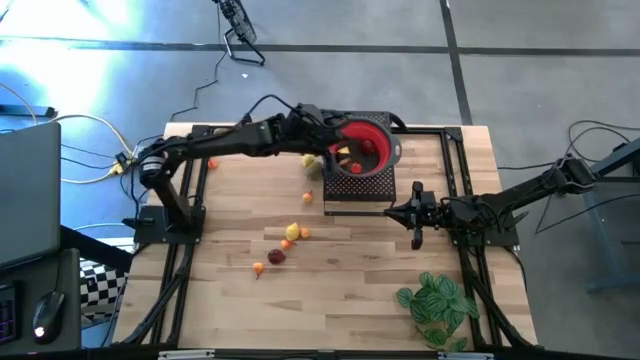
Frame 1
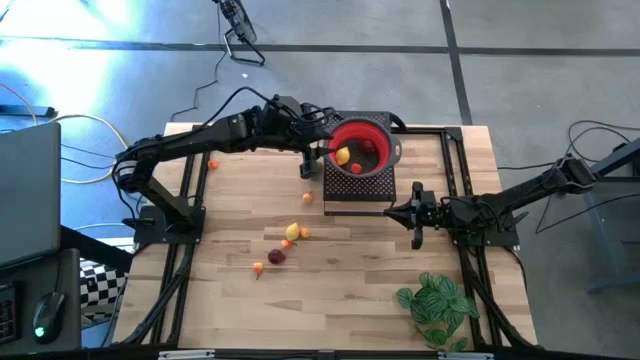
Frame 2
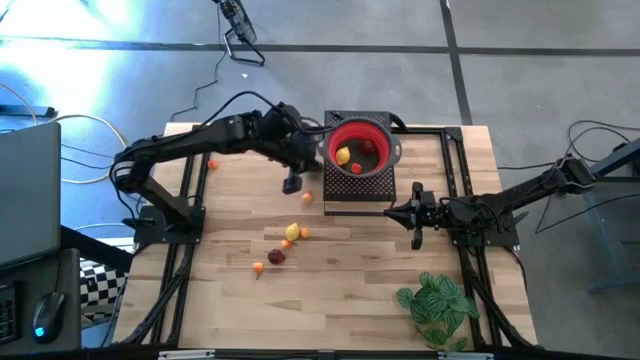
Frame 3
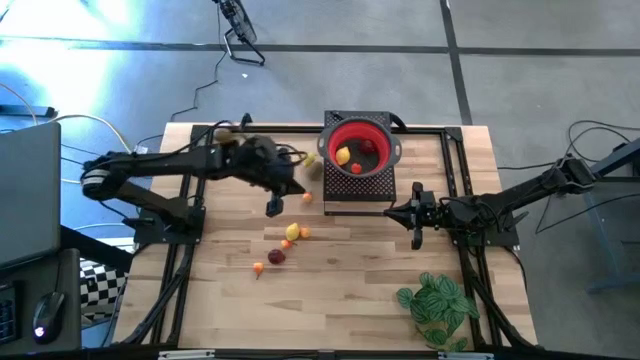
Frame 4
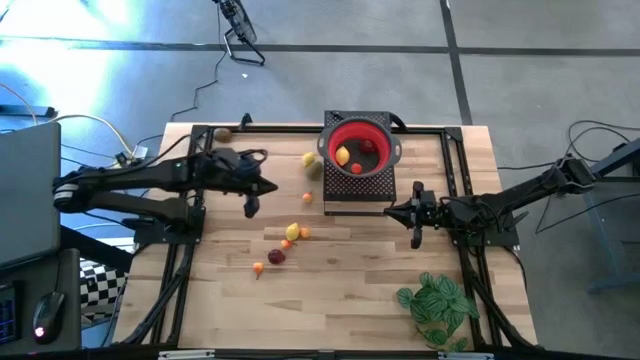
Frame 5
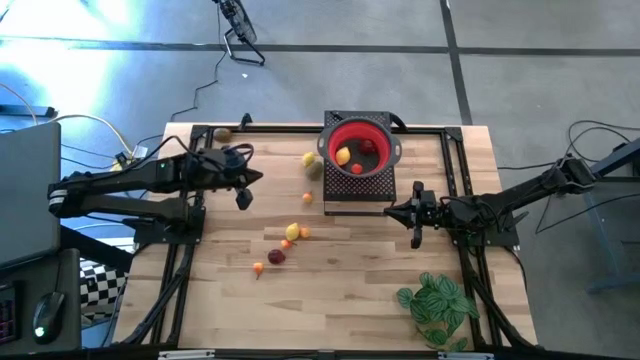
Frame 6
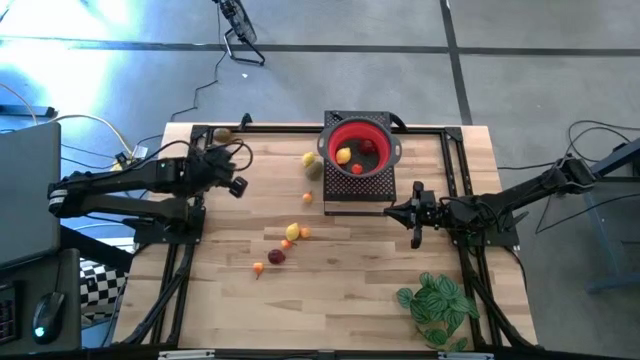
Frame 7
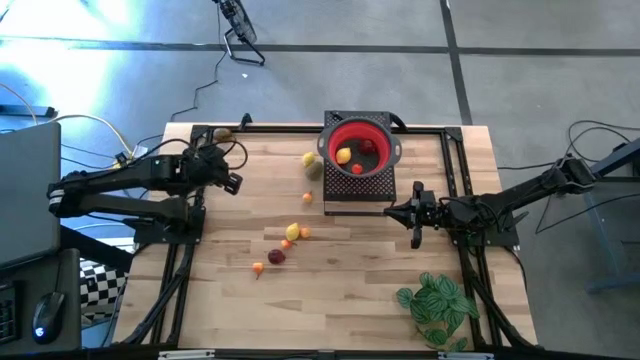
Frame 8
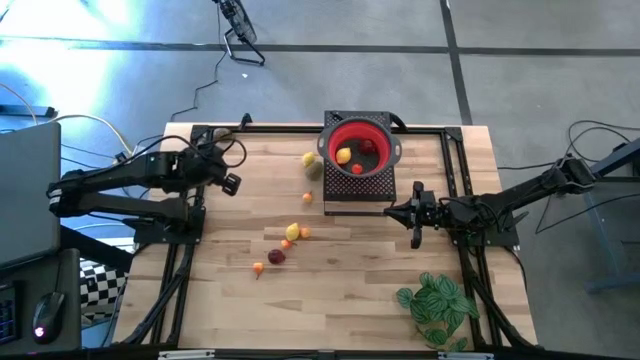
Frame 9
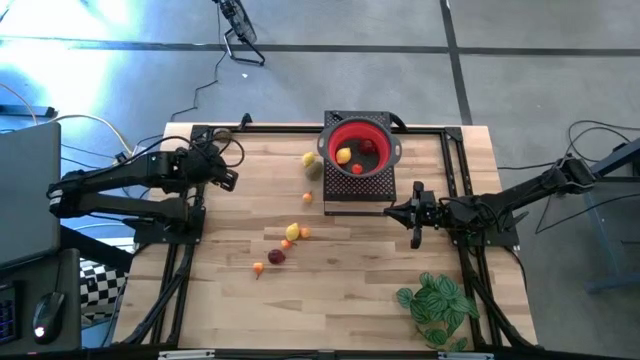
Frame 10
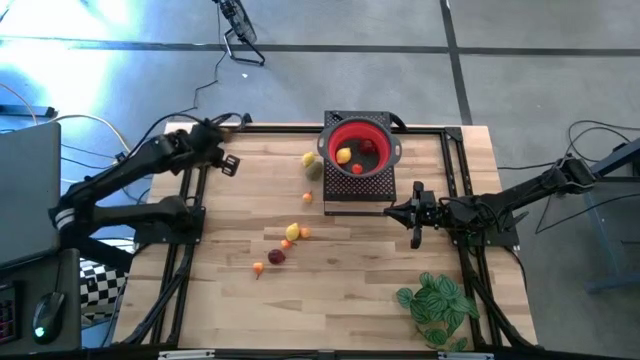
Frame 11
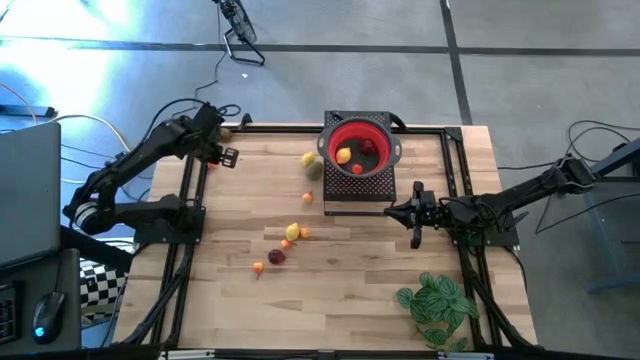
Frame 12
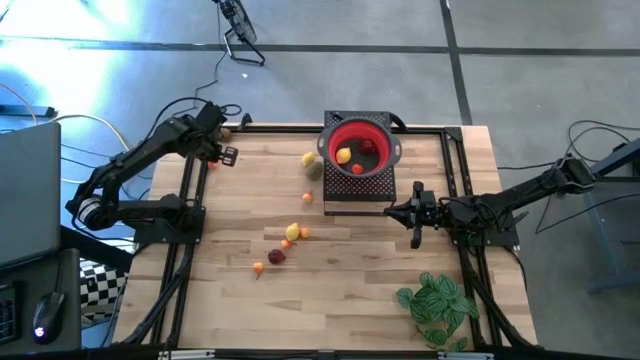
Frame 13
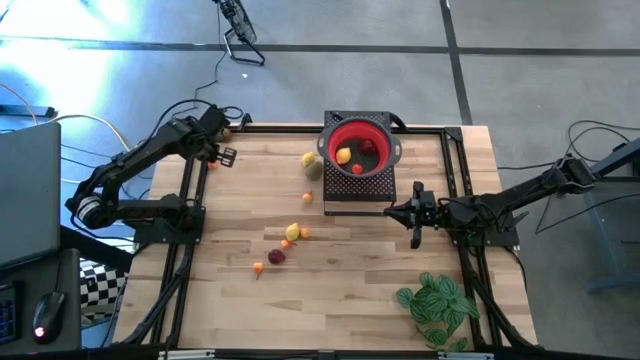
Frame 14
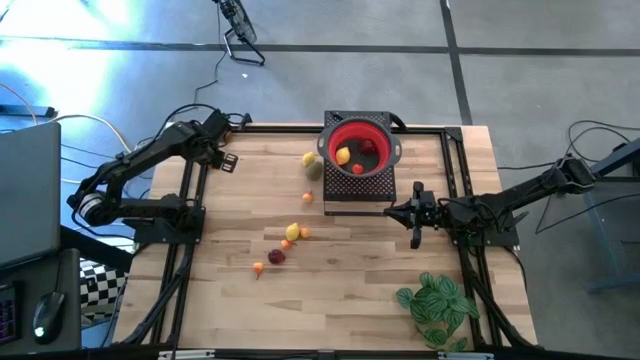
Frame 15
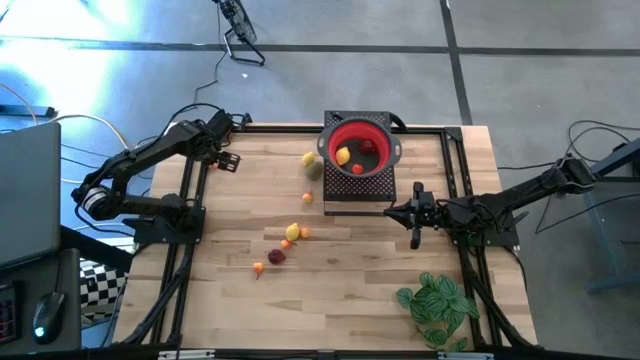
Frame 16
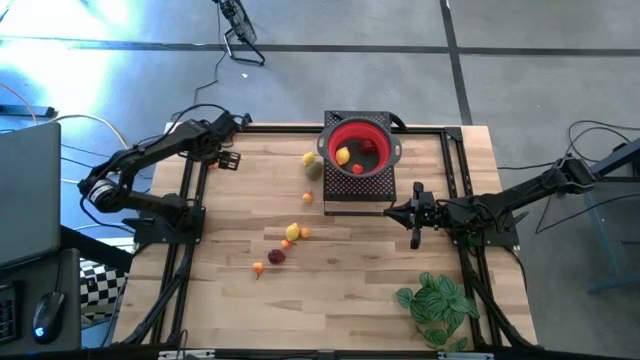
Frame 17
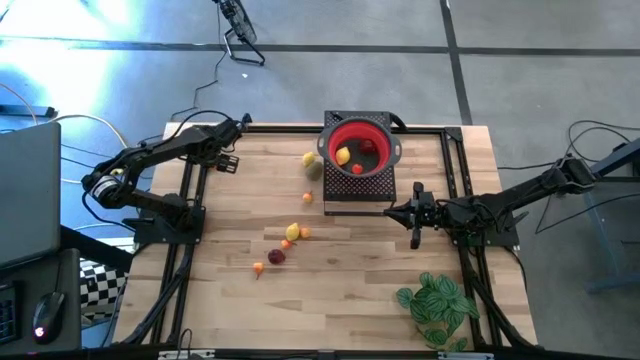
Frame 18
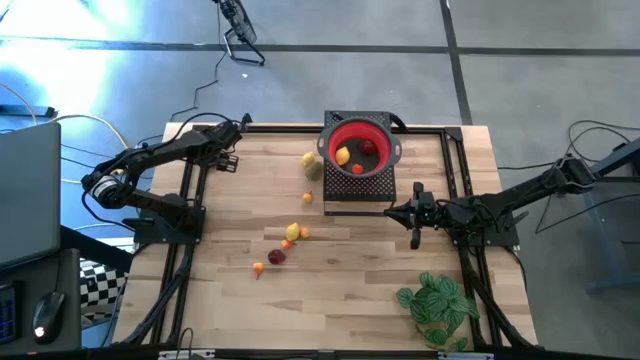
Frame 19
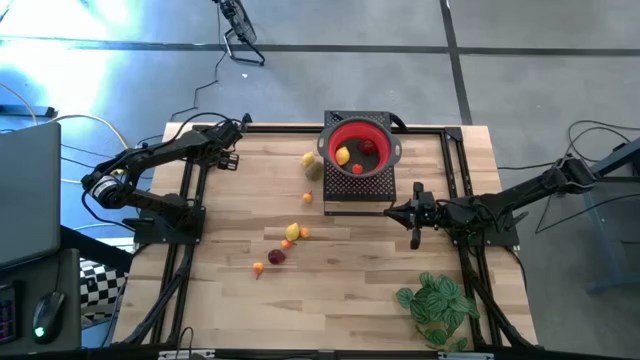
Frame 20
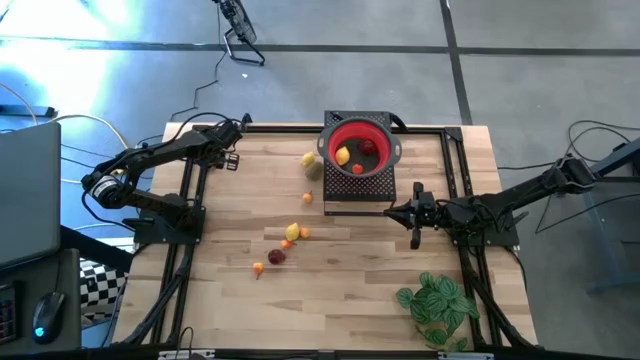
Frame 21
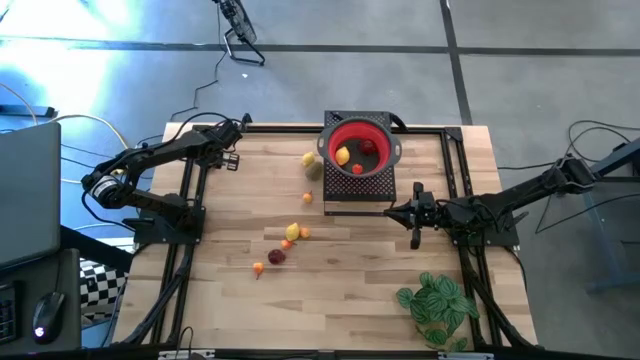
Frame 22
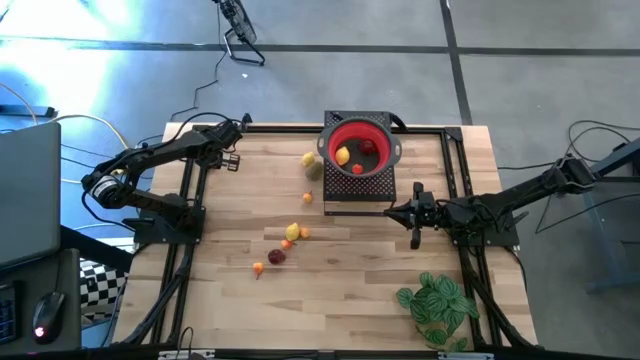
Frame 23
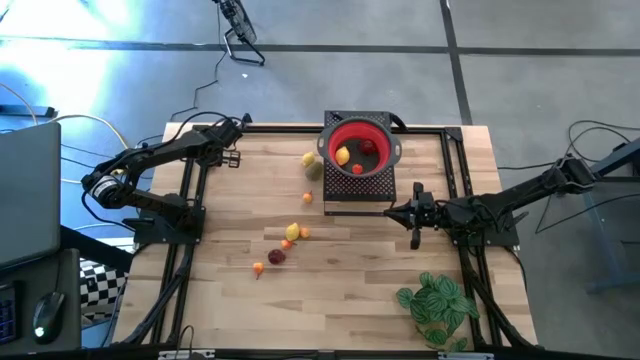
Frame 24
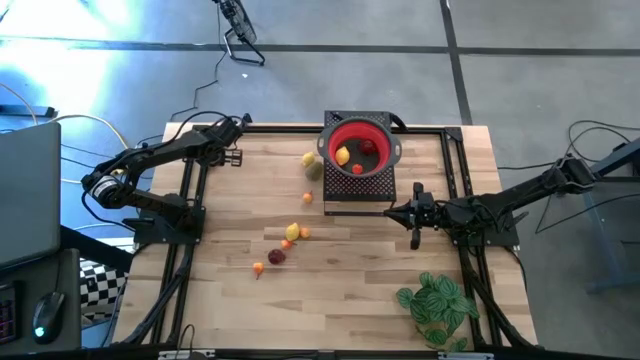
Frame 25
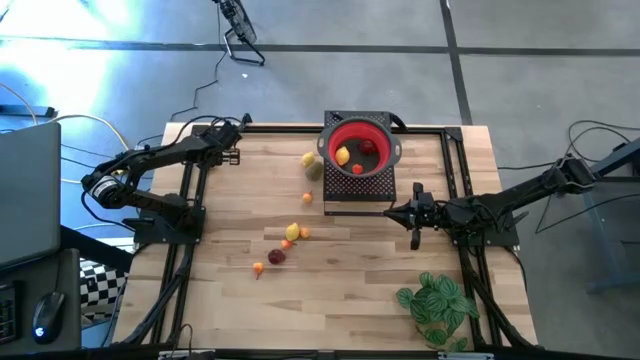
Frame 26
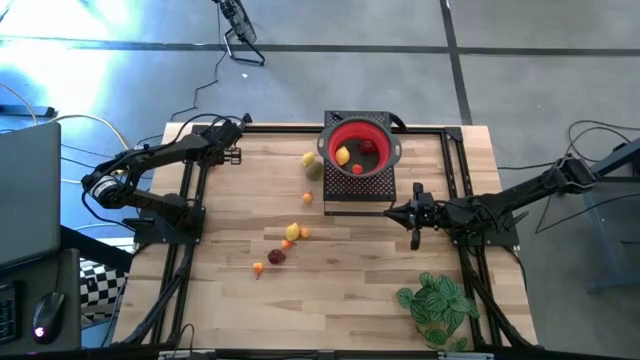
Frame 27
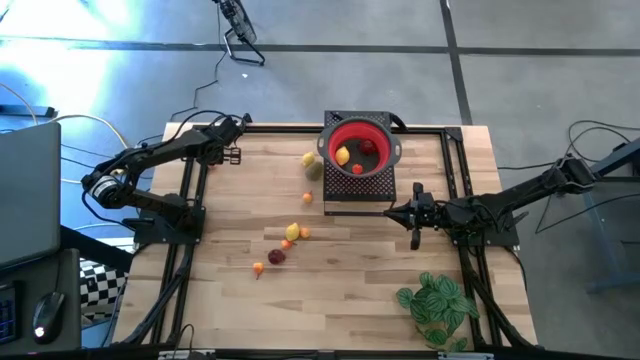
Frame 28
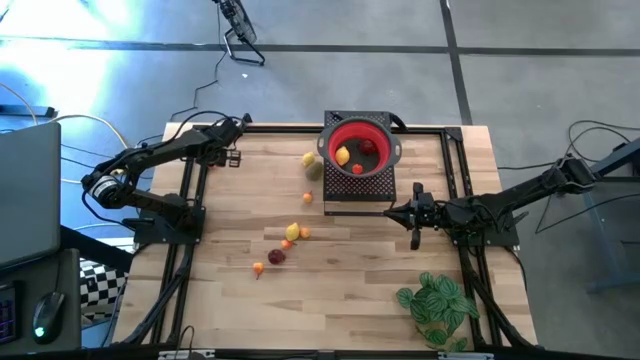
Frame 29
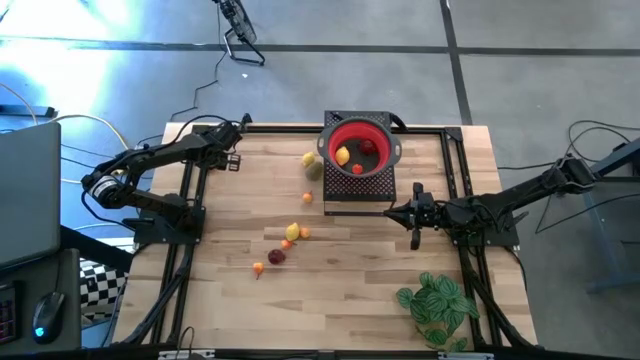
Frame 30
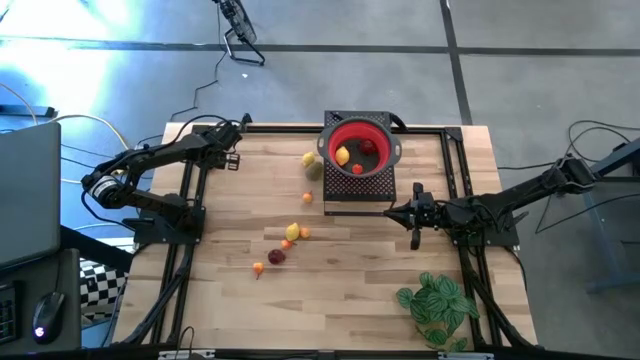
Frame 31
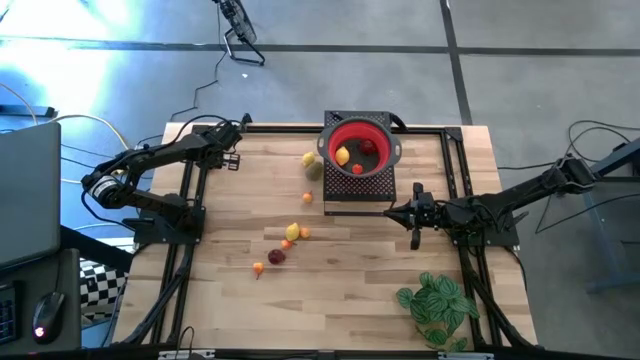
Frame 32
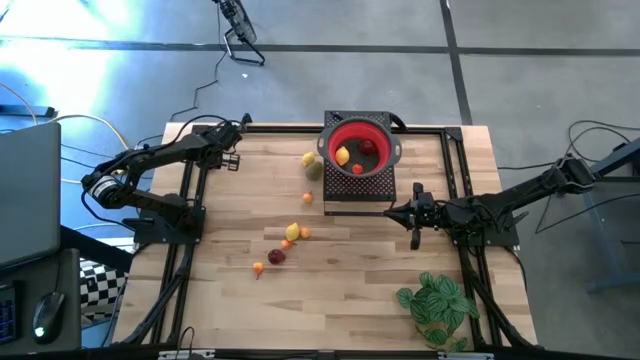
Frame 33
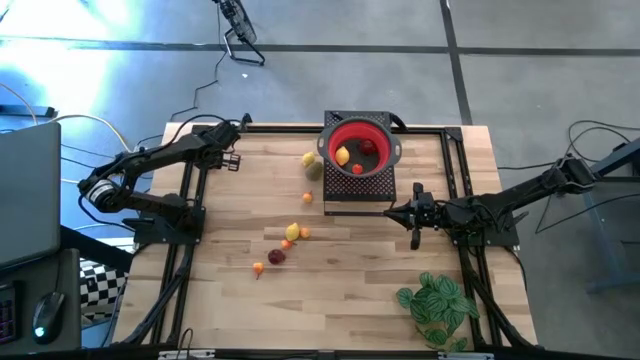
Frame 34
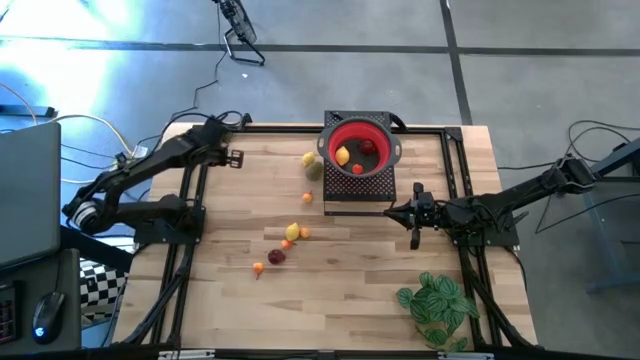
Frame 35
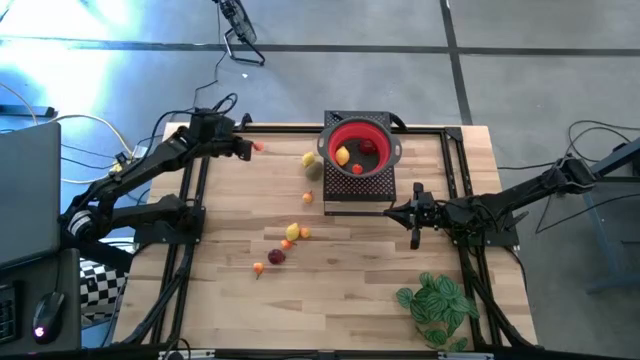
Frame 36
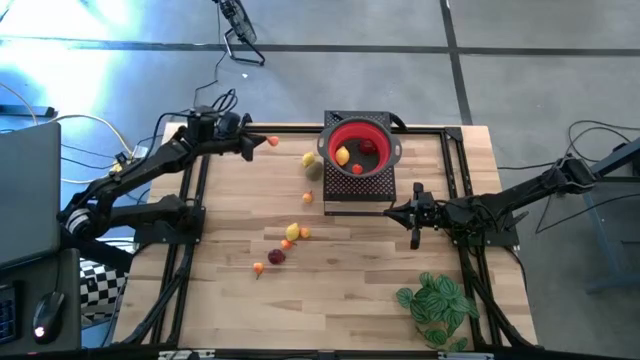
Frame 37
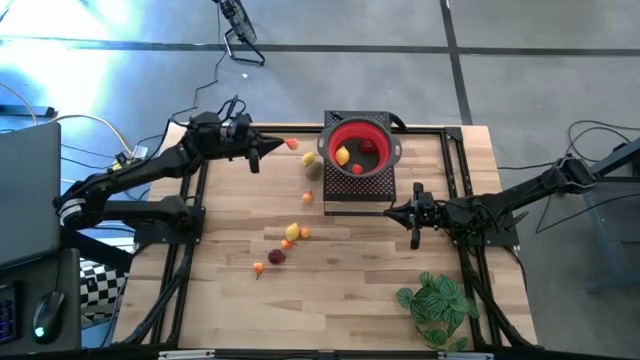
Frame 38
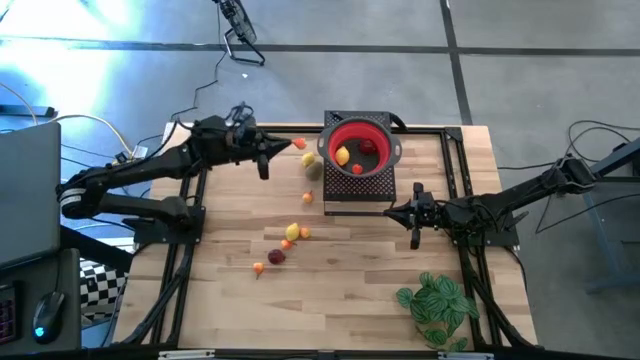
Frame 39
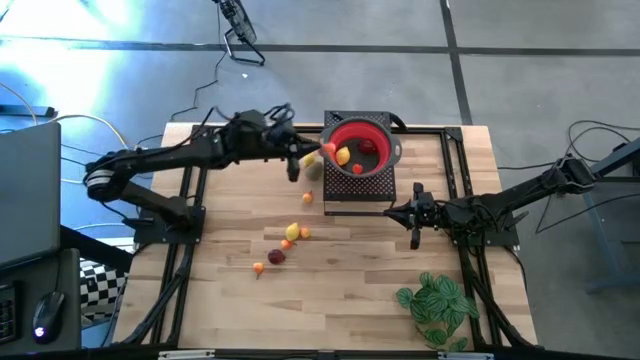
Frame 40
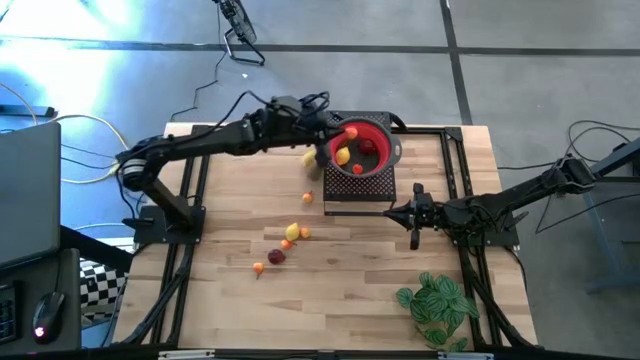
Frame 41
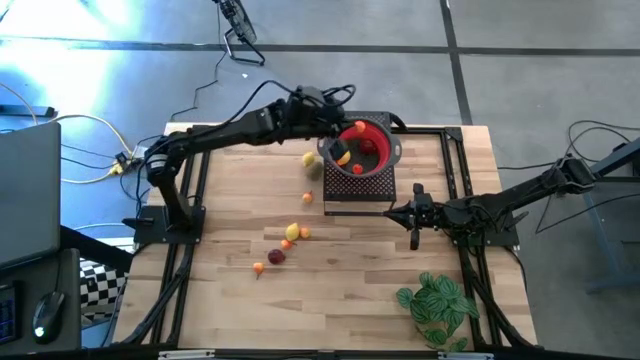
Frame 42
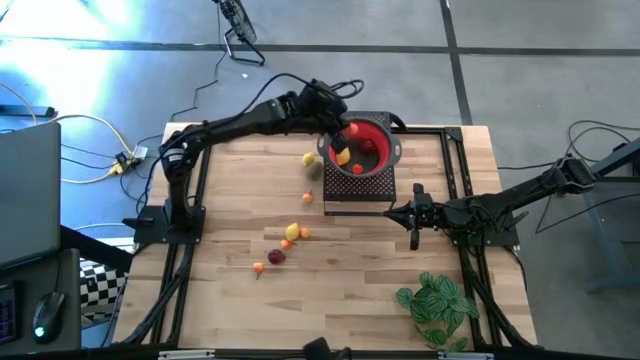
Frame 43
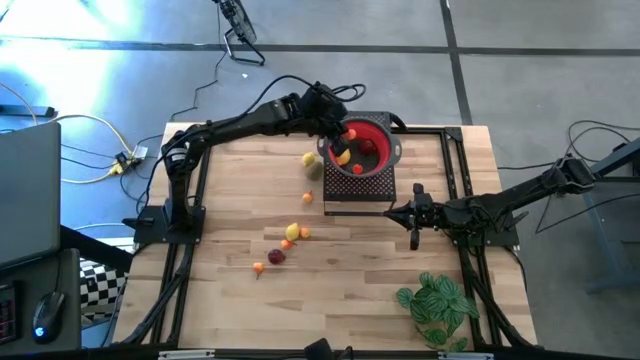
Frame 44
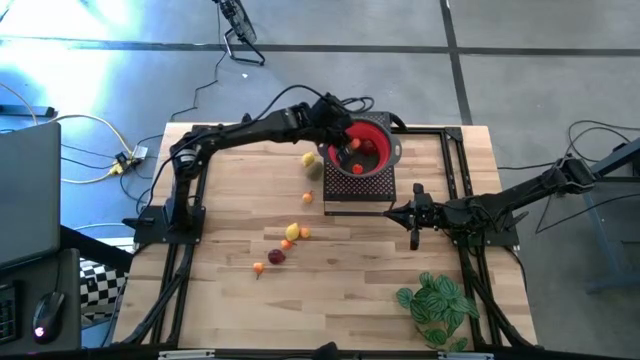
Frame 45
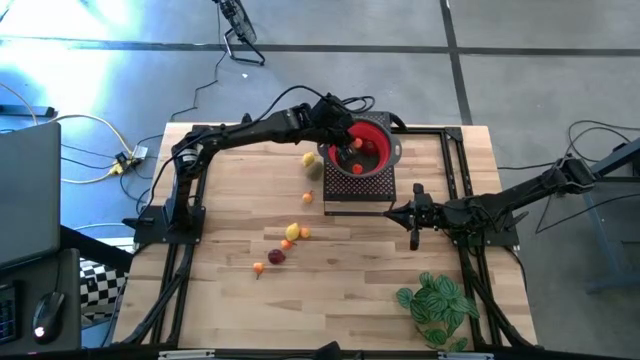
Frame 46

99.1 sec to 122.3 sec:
Task: Pick & Place Fruit
Put the orange pear into the red strainer bowl on the shelf
